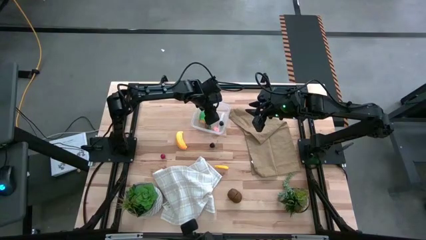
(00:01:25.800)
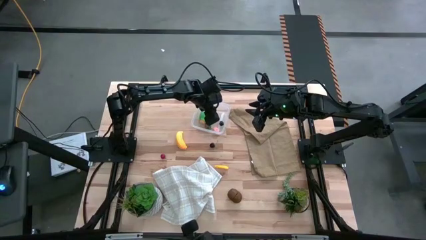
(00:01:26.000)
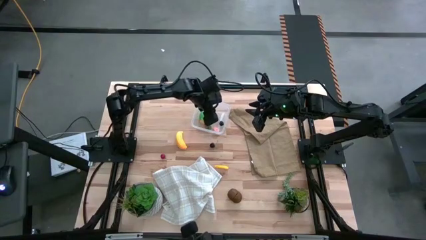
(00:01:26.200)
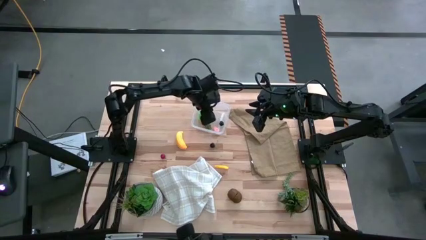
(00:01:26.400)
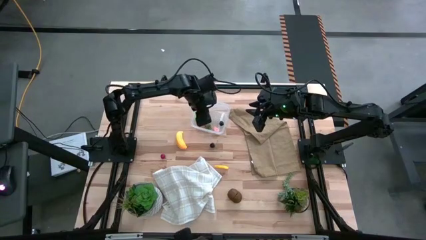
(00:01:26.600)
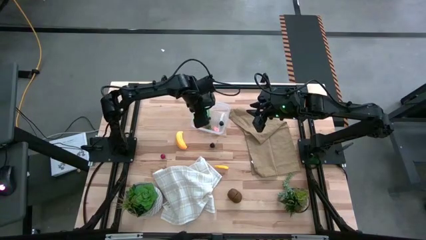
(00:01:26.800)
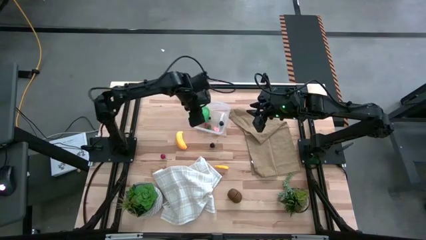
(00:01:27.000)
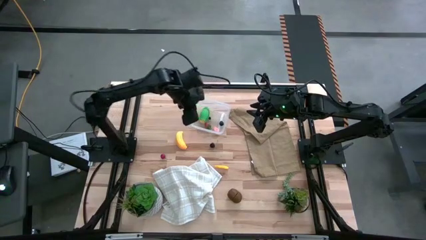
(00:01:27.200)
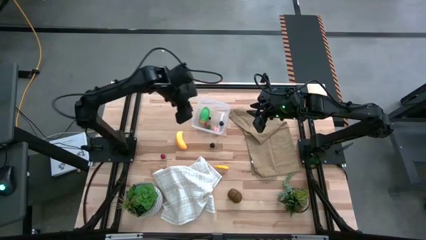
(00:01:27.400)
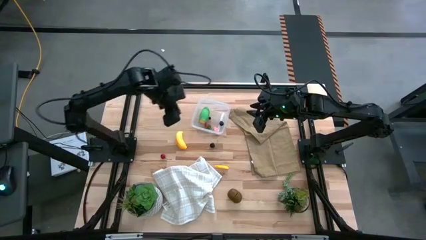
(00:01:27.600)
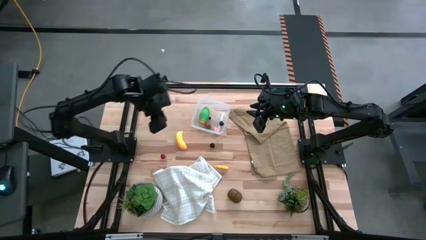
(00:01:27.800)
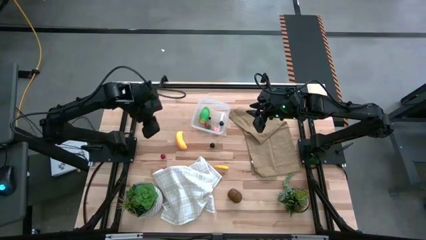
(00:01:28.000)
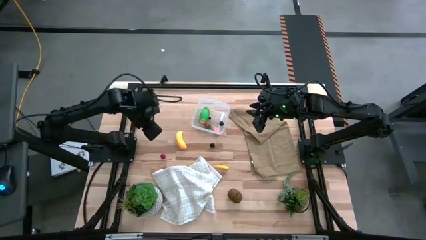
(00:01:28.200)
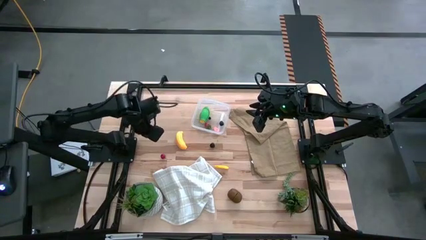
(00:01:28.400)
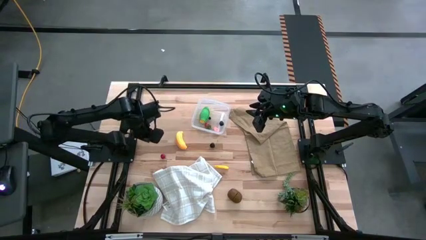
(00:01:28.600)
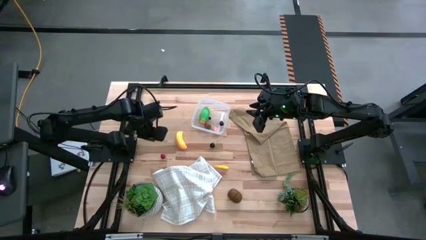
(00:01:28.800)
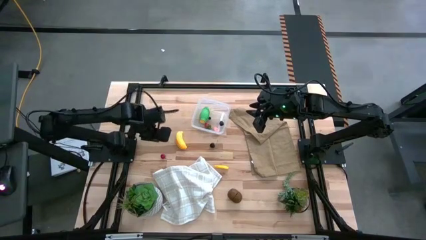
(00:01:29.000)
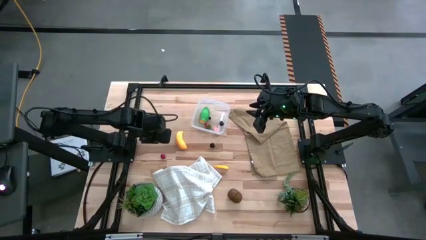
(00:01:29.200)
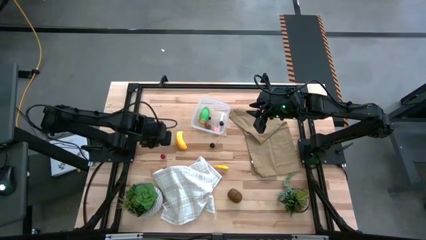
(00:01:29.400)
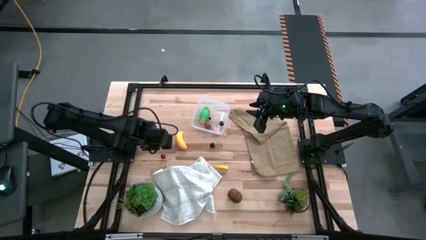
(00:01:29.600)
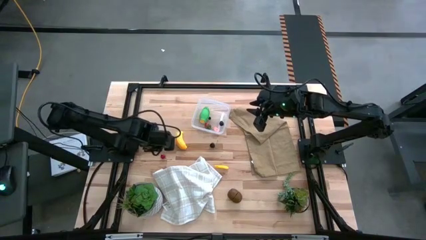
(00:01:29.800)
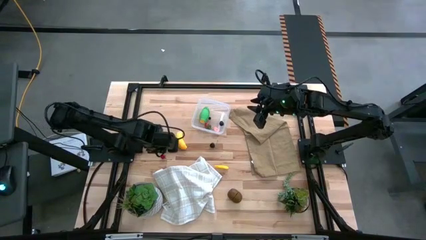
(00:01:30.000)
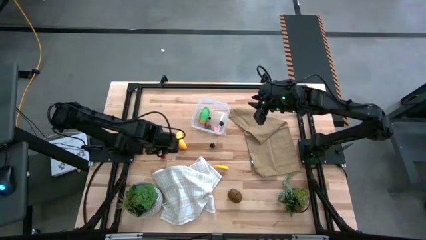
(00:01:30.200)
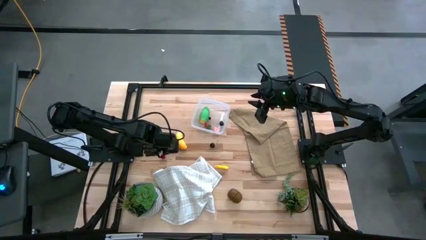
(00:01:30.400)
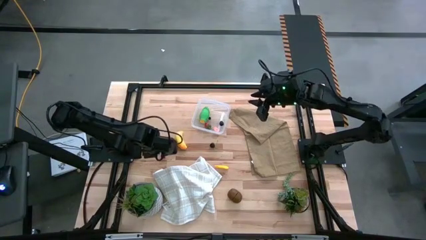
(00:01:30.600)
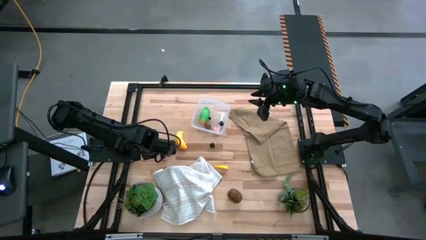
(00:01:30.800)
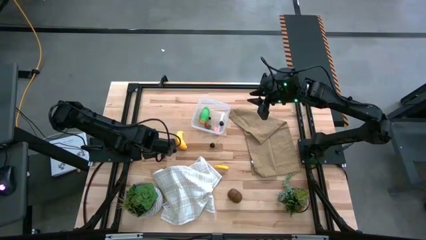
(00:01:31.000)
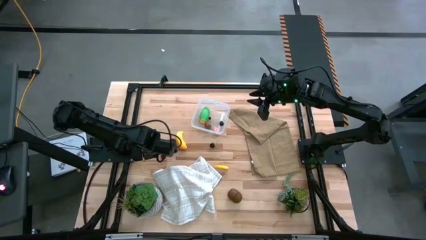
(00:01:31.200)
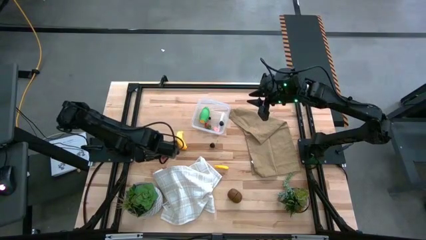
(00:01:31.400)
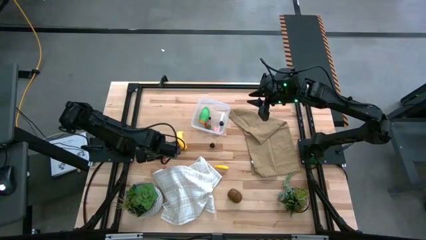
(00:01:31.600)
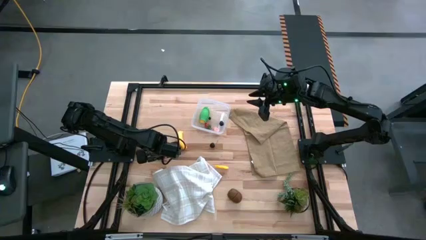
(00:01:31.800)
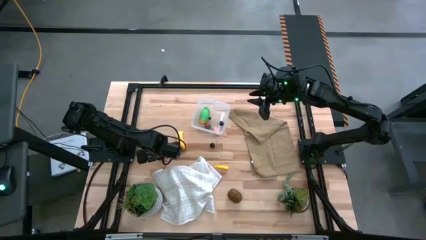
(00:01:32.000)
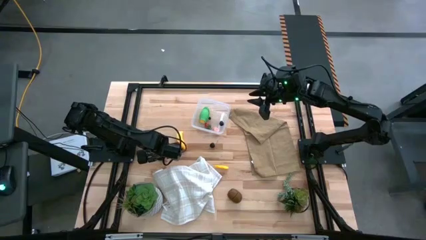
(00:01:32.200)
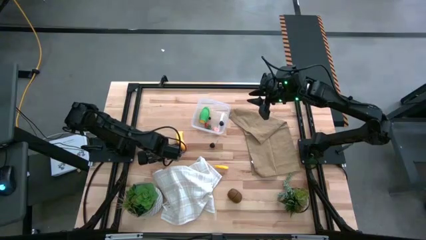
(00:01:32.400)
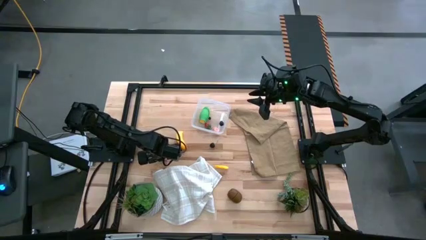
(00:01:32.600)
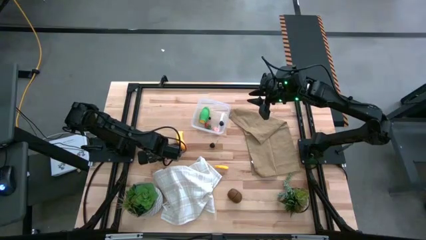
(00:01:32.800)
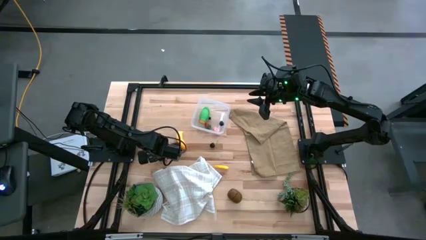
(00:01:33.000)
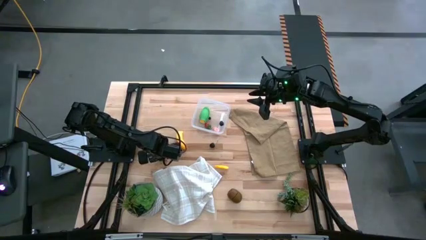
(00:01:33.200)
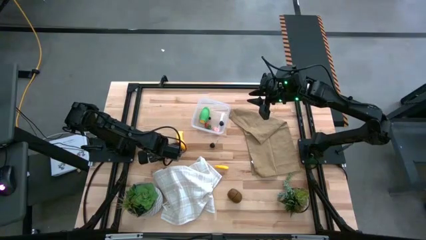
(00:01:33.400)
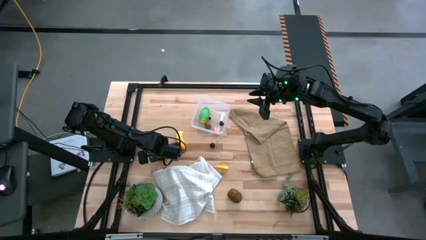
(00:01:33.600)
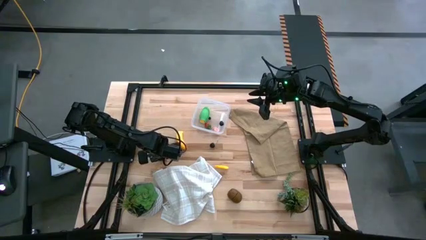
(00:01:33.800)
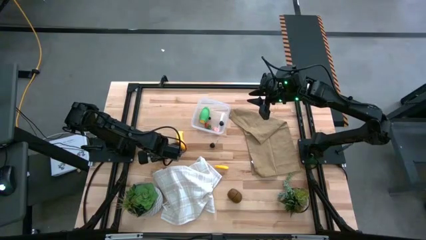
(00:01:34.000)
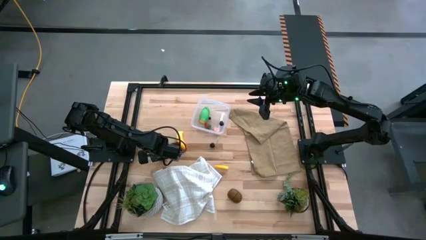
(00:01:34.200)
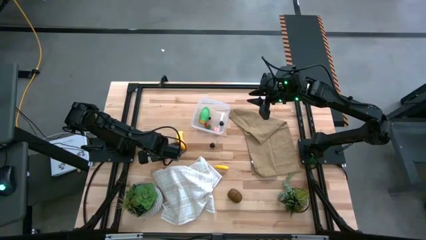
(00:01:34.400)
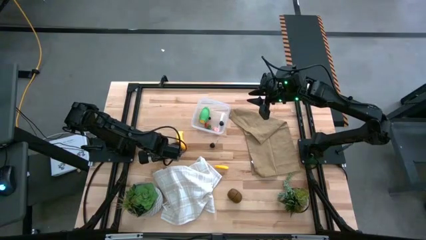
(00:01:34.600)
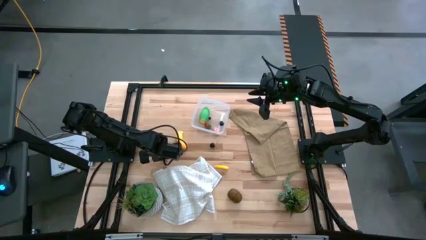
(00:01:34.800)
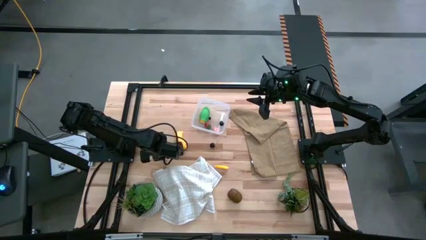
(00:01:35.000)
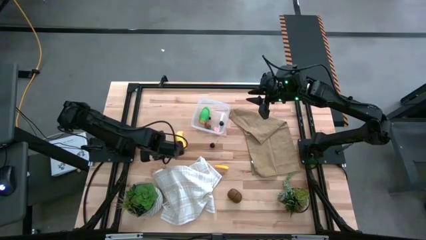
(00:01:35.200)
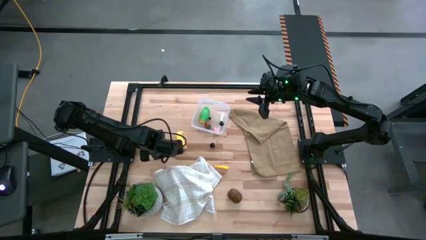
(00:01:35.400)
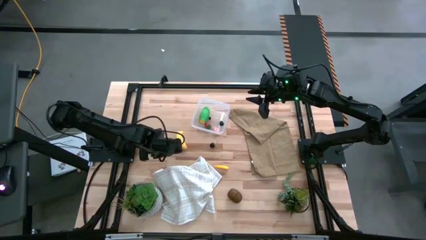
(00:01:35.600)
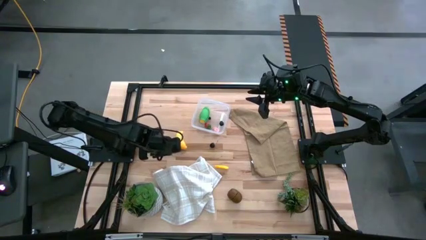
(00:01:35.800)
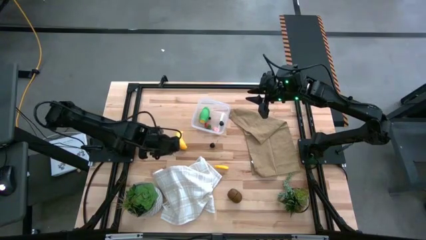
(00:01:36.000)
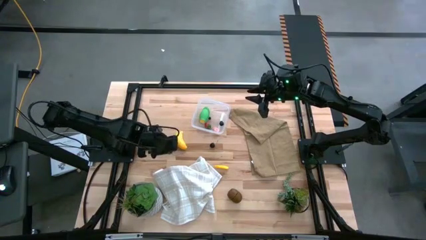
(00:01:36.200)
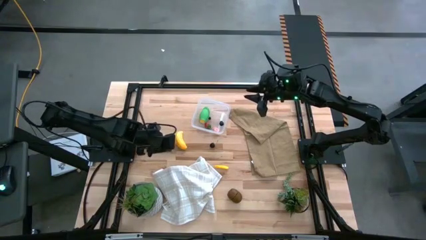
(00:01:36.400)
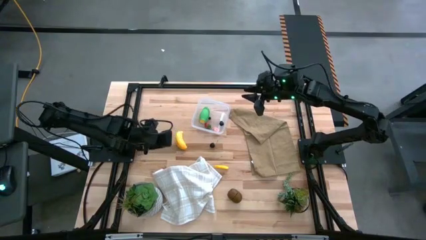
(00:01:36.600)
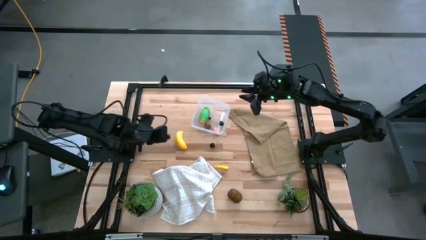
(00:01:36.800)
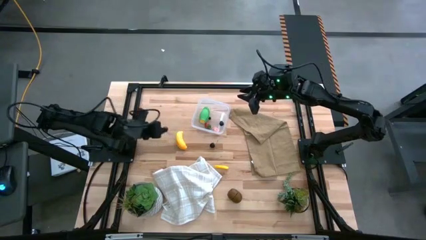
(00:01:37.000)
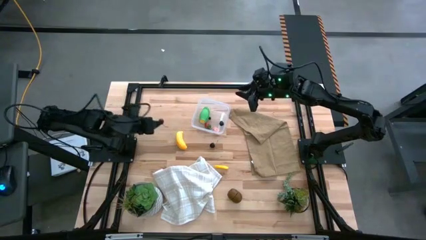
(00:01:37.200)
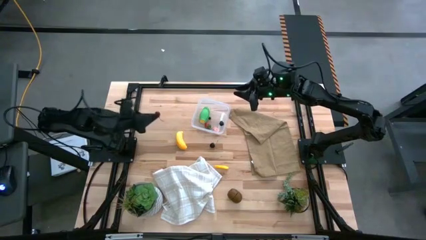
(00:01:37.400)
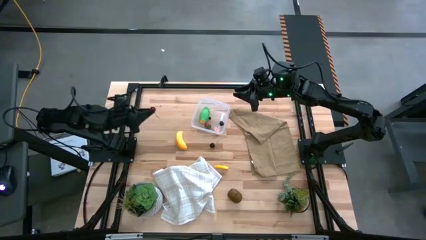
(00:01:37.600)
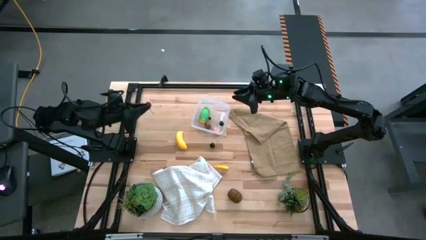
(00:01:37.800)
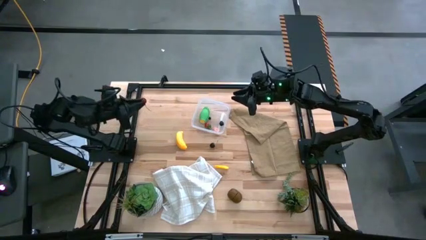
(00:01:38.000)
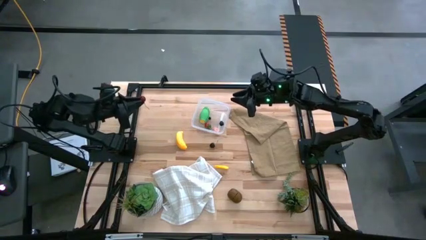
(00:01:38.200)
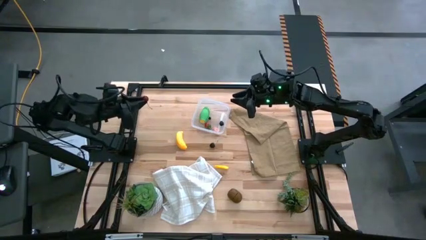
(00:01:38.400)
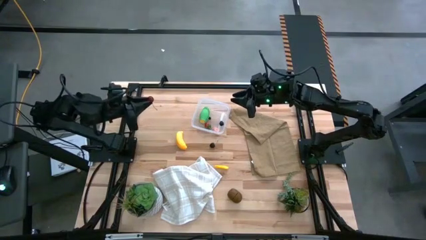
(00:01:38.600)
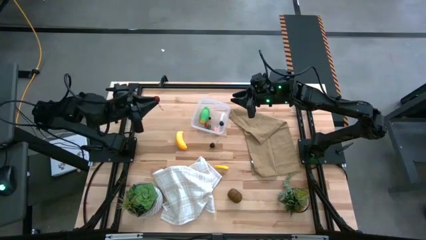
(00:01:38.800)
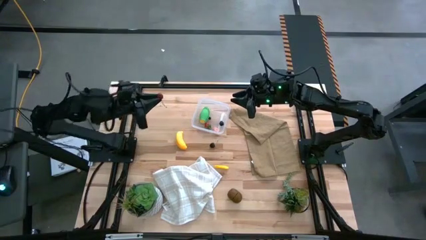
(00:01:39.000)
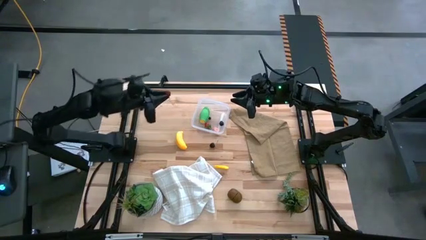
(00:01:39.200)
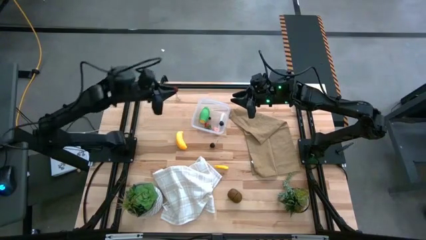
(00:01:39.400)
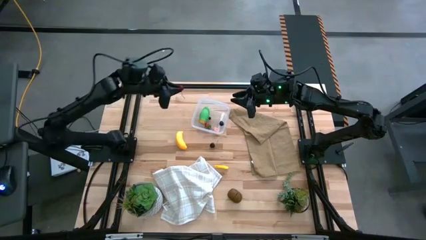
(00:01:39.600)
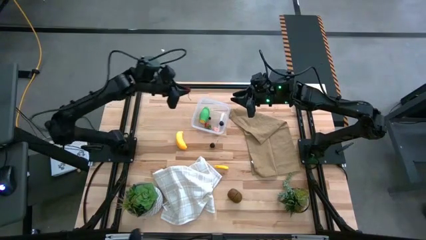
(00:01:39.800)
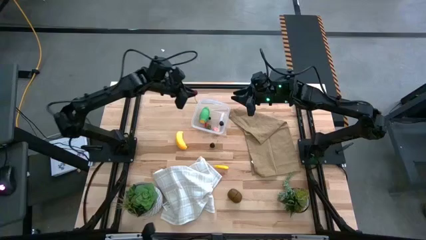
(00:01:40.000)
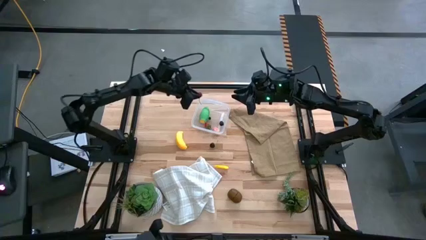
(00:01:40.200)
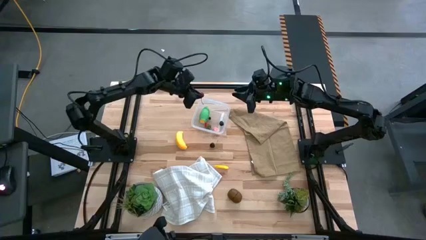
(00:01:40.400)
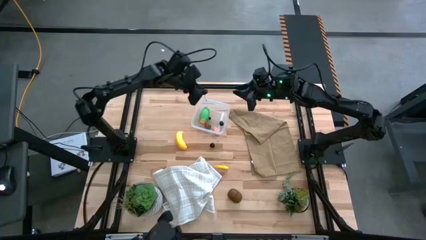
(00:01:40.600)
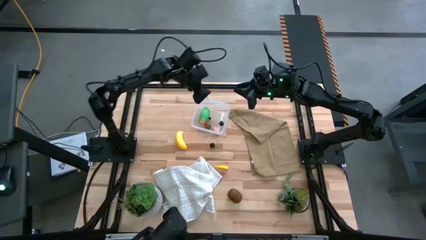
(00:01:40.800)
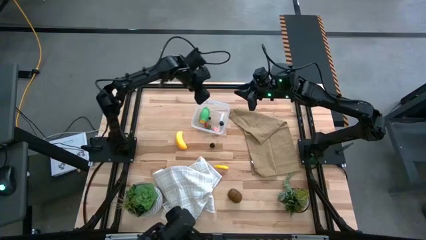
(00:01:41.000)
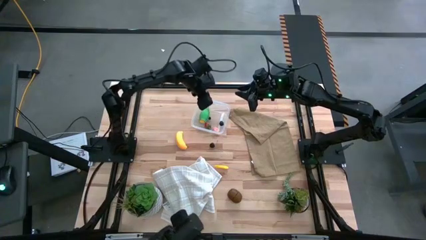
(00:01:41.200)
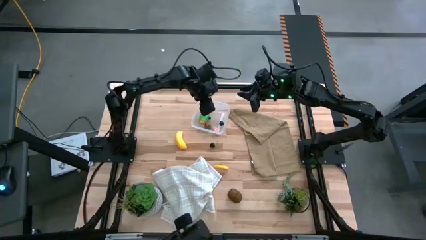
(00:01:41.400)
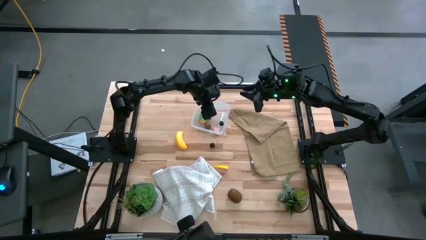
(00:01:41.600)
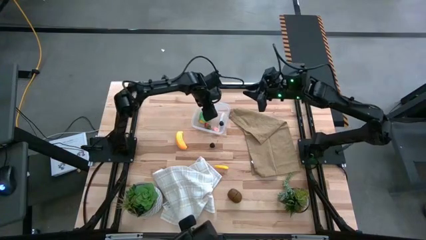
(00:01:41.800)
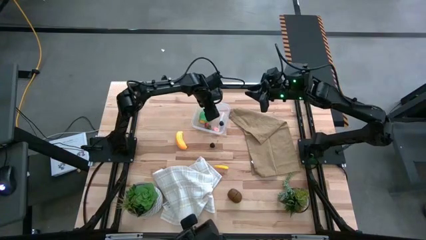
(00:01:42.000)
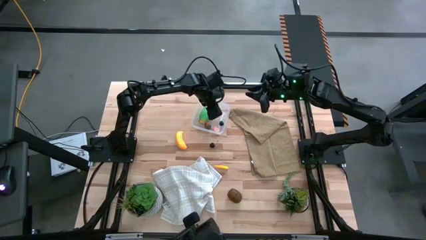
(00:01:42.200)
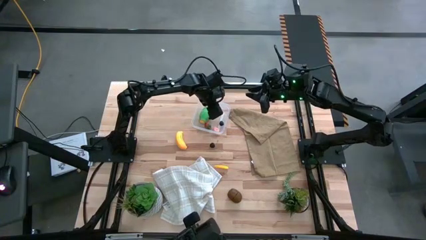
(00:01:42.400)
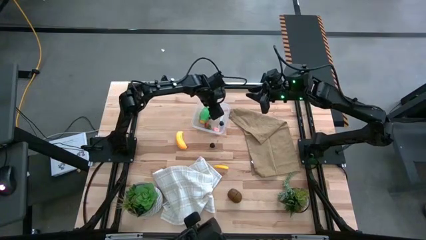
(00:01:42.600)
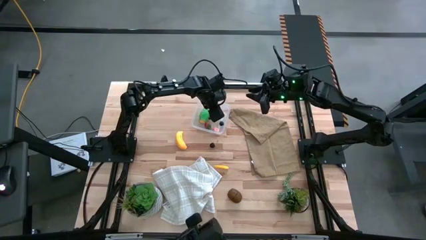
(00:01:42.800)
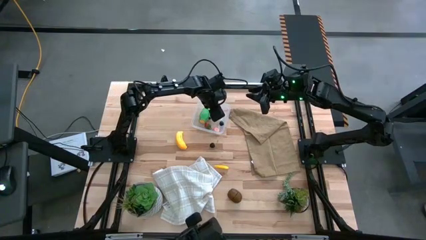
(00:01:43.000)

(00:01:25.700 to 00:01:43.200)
Task: Pick and placing Produce into tupperware
Put the red cherry into the transparent bin
